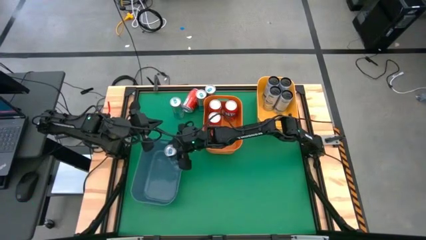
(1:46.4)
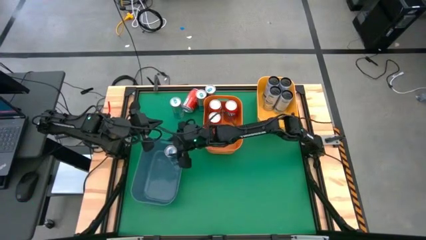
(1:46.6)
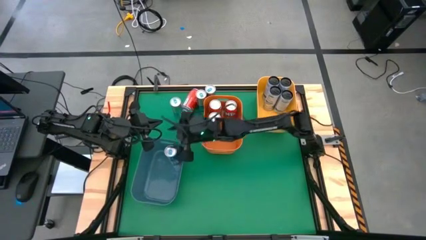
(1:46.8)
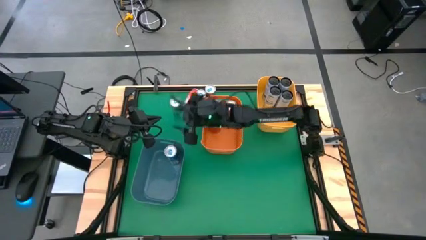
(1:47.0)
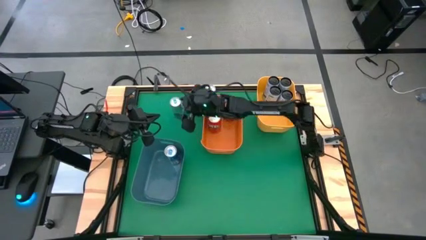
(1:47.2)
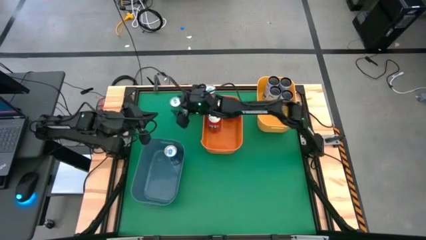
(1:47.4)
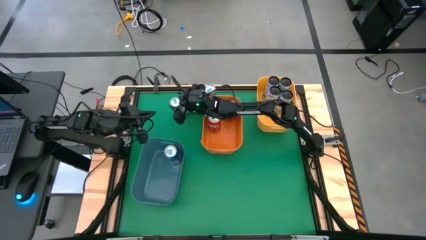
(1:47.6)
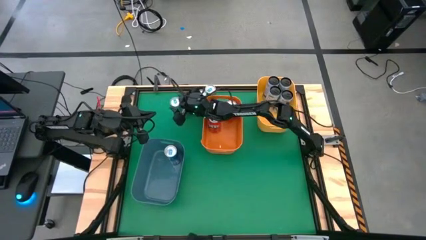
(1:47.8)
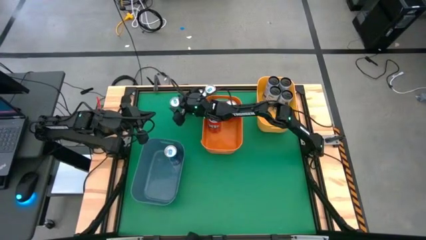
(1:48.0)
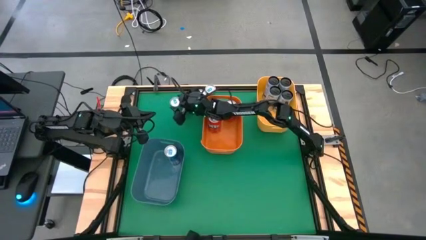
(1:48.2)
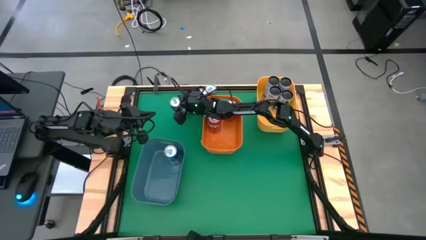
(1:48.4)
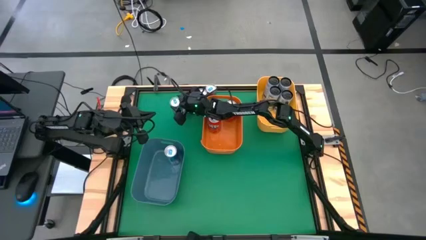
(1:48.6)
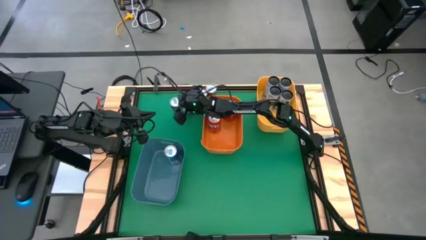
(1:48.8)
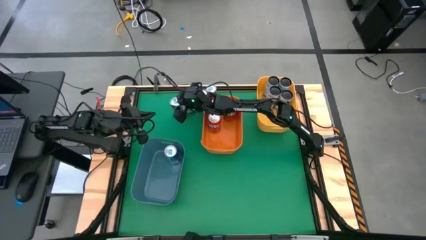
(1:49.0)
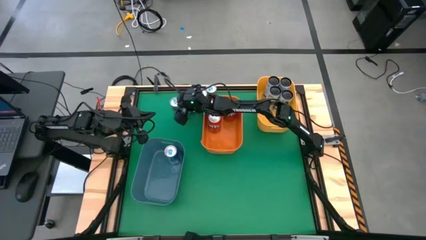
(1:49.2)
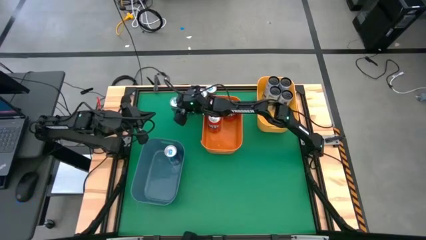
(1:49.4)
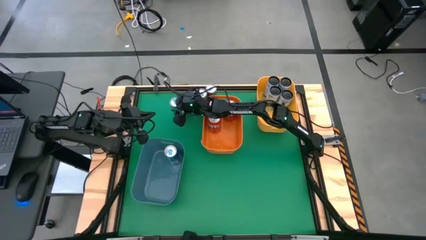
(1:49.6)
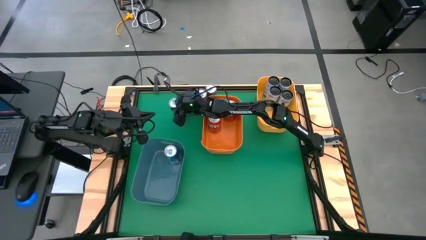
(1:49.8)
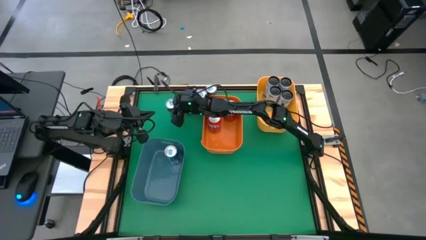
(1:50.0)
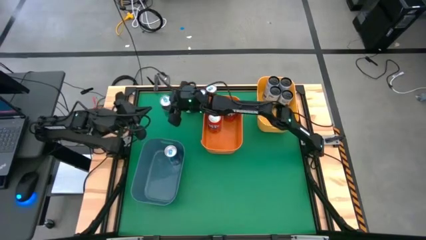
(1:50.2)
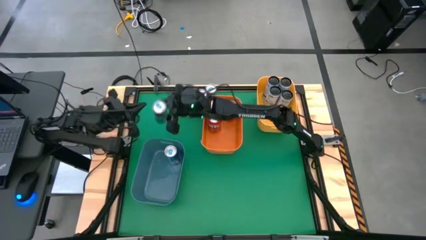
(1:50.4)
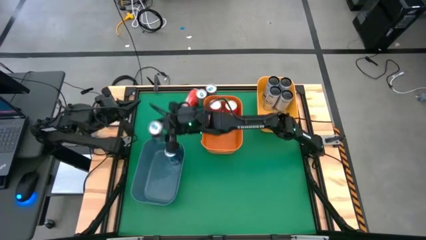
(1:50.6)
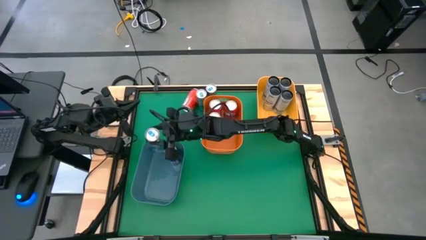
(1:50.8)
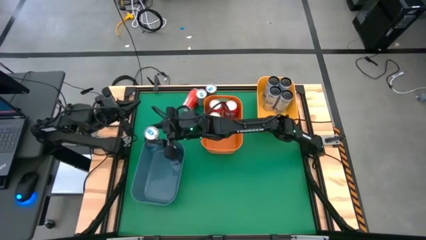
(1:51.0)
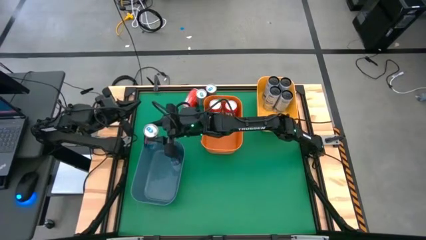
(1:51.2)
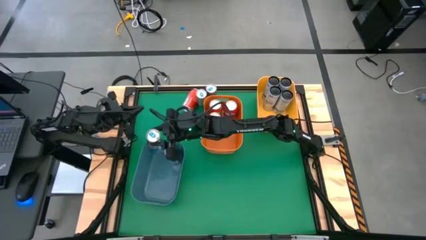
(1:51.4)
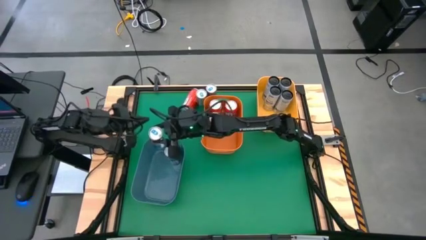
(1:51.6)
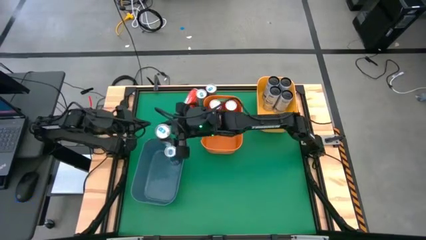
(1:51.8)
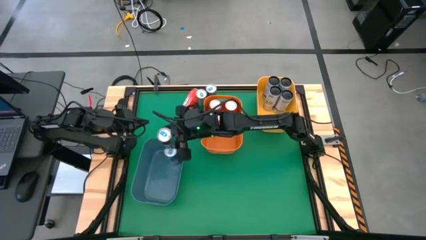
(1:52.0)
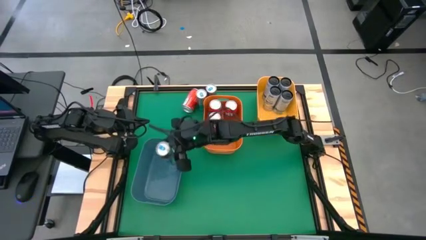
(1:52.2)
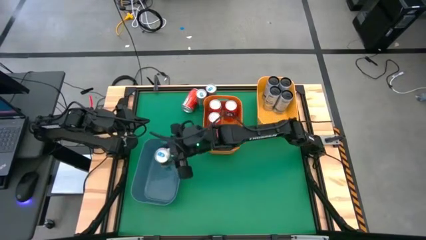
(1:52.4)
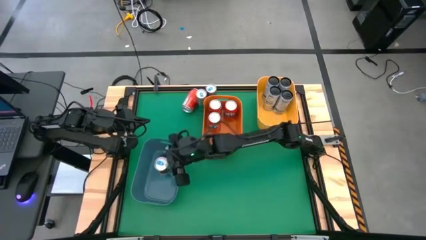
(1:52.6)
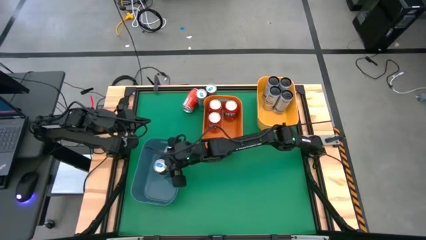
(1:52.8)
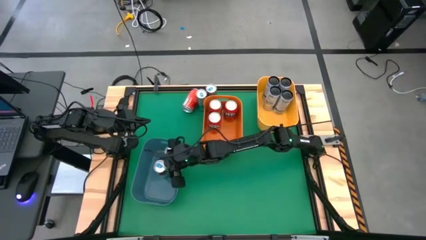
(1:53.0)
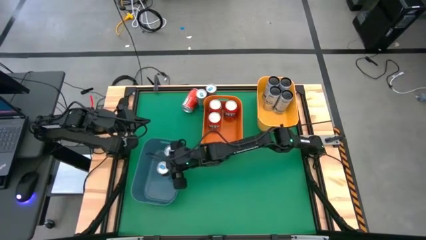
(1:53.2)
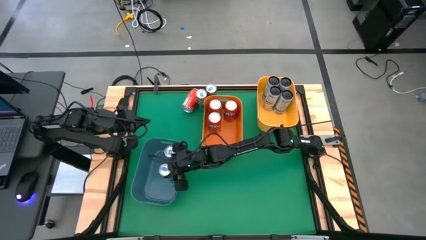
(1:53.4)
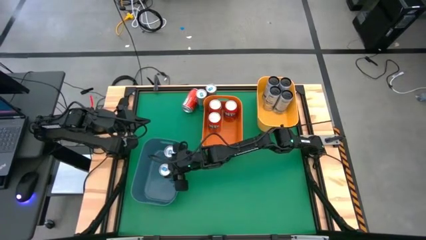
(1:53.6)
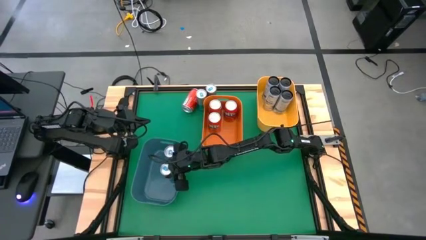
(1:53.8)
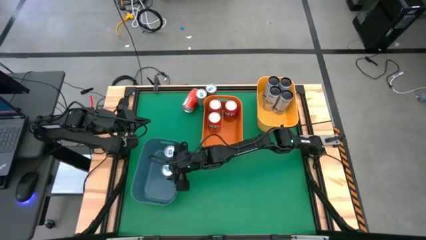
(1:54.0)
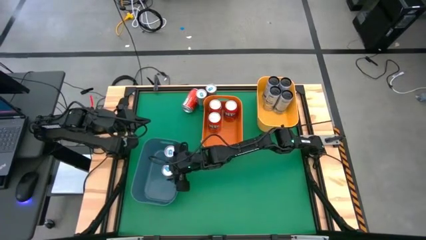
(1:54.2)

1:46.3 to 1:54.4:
Task: Sort soda cans
Put the blue soda can into the blue bin

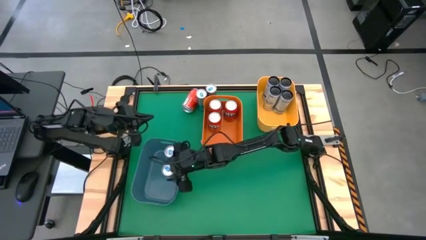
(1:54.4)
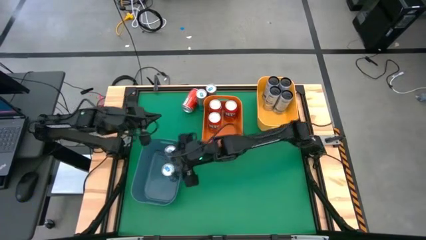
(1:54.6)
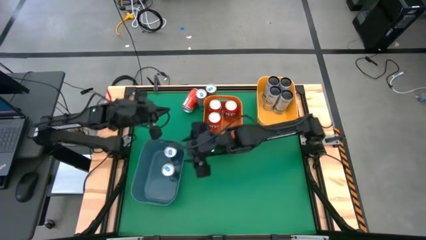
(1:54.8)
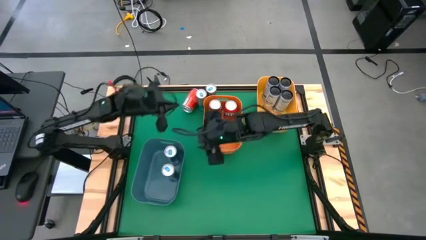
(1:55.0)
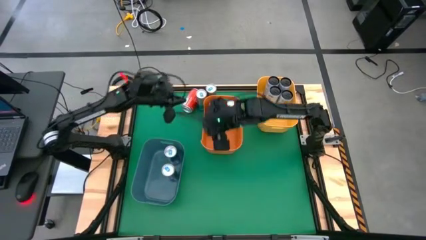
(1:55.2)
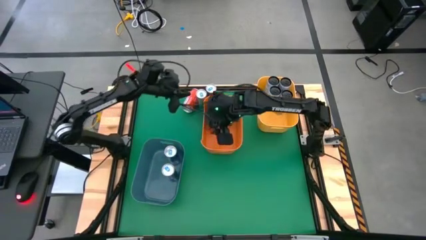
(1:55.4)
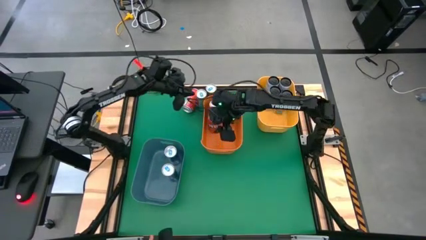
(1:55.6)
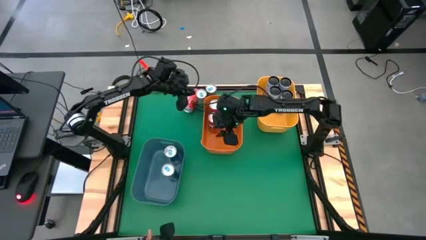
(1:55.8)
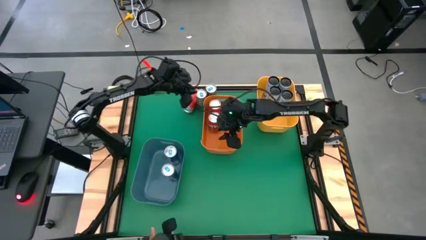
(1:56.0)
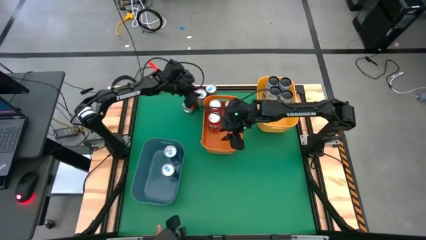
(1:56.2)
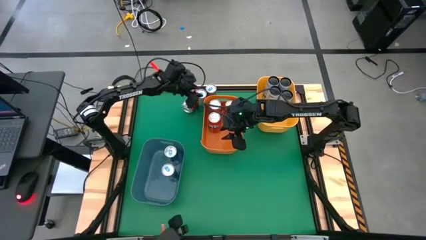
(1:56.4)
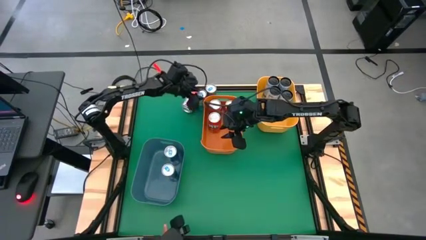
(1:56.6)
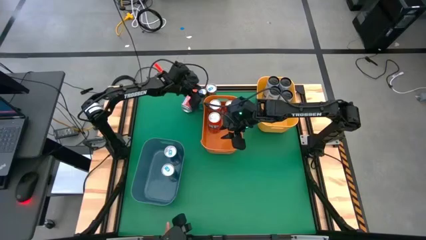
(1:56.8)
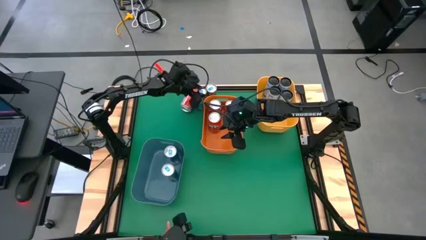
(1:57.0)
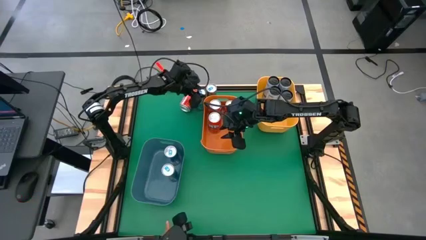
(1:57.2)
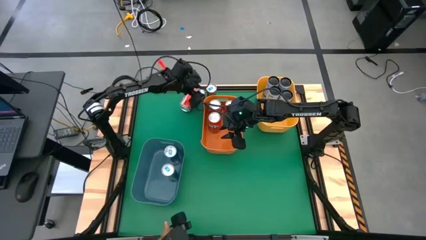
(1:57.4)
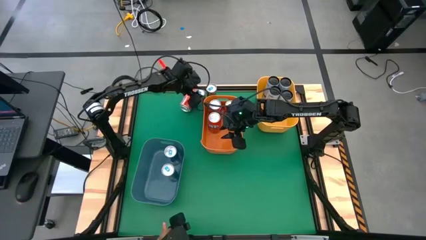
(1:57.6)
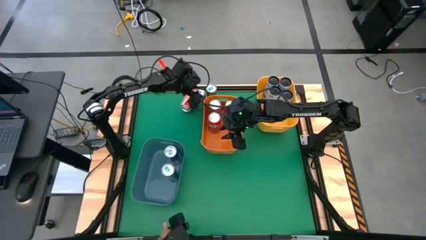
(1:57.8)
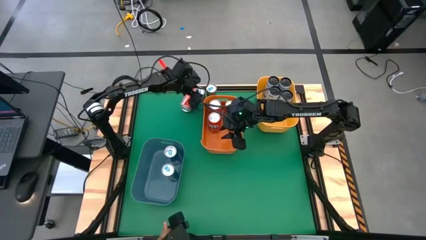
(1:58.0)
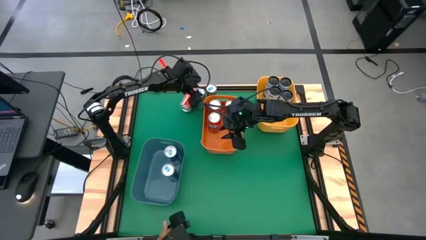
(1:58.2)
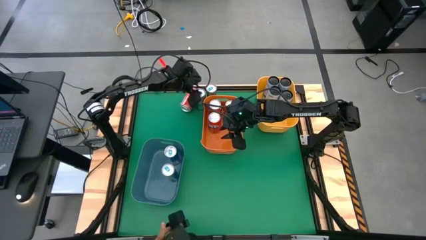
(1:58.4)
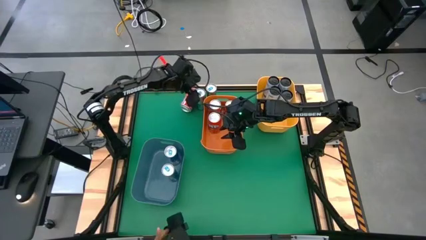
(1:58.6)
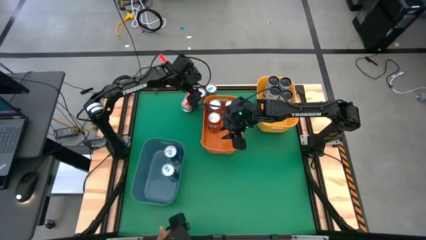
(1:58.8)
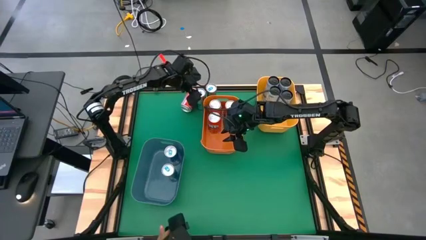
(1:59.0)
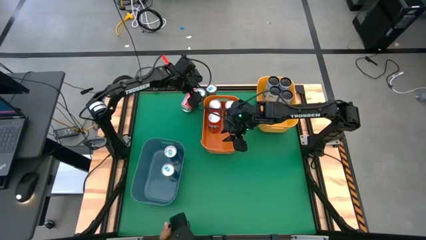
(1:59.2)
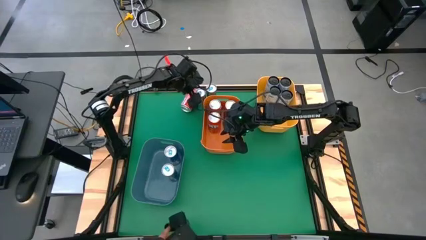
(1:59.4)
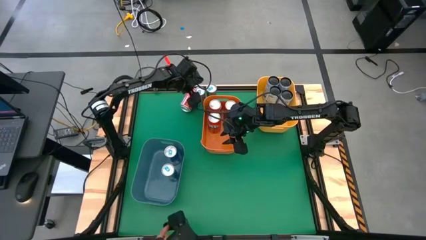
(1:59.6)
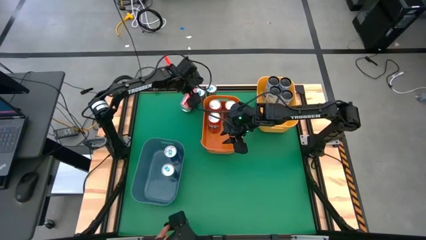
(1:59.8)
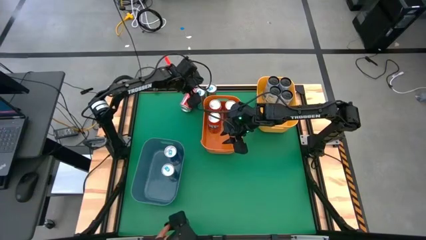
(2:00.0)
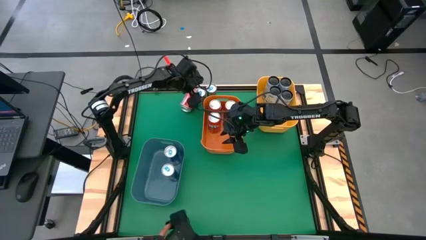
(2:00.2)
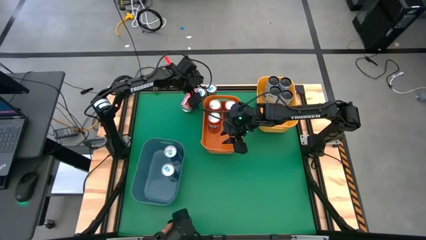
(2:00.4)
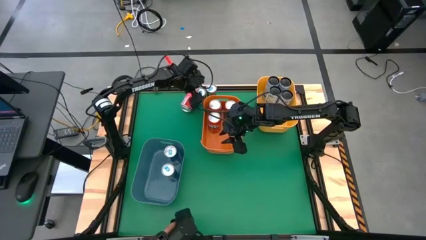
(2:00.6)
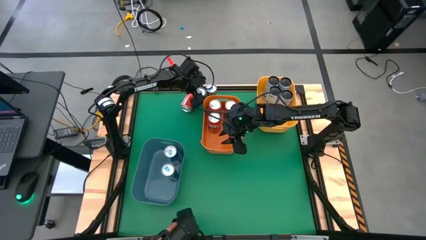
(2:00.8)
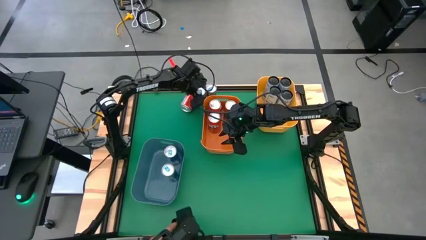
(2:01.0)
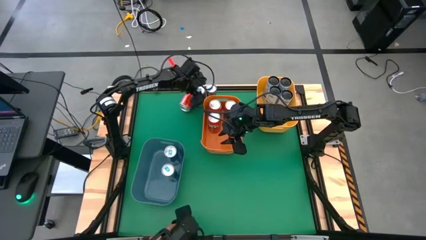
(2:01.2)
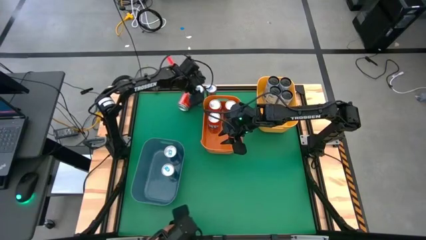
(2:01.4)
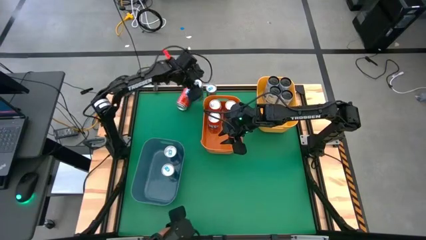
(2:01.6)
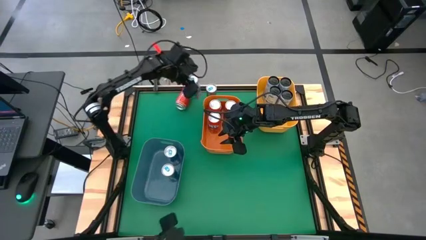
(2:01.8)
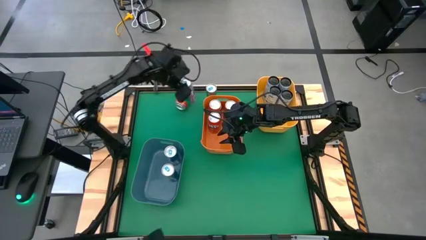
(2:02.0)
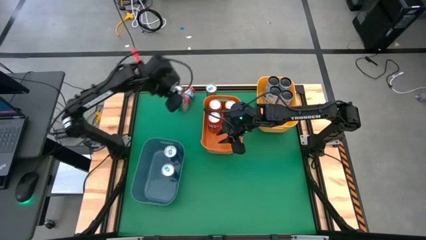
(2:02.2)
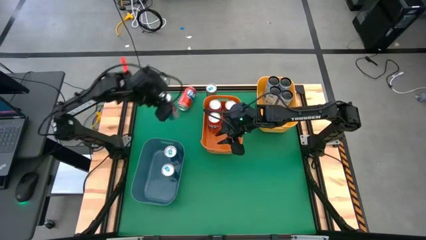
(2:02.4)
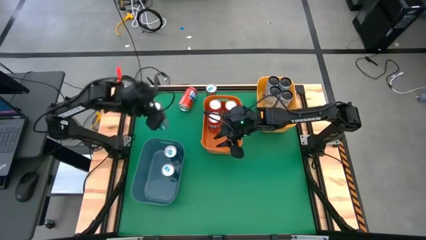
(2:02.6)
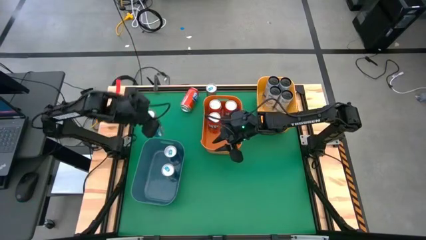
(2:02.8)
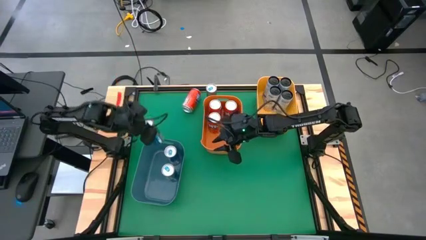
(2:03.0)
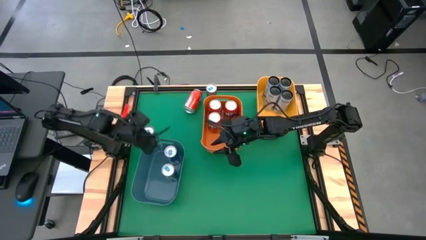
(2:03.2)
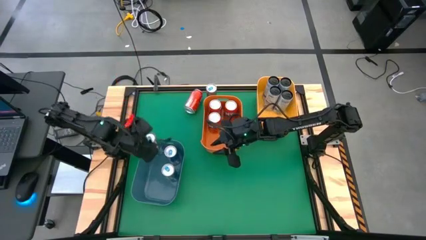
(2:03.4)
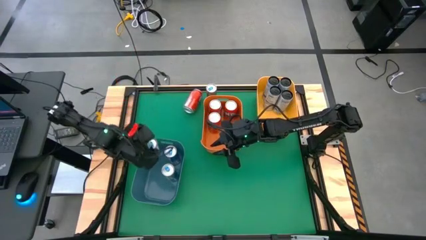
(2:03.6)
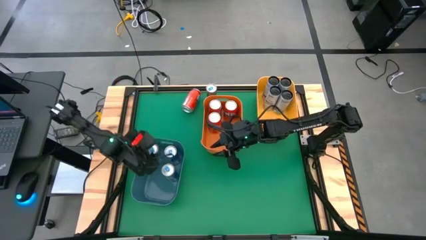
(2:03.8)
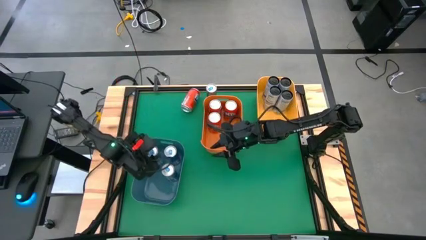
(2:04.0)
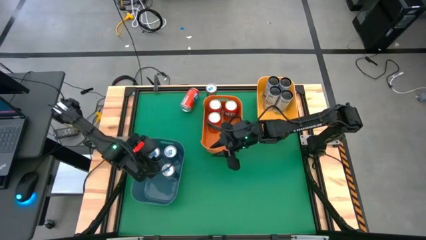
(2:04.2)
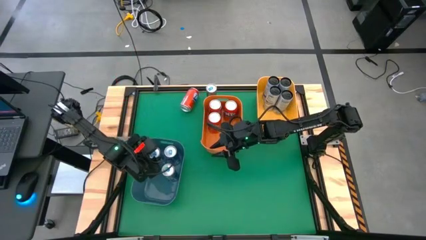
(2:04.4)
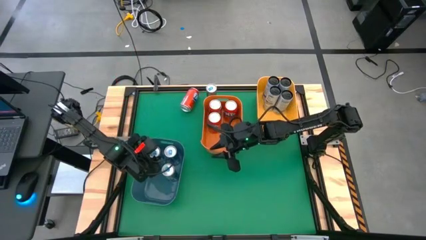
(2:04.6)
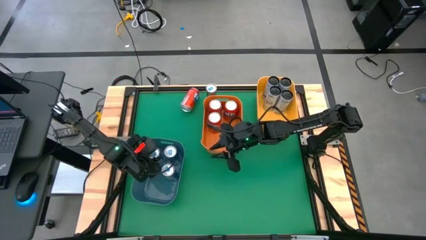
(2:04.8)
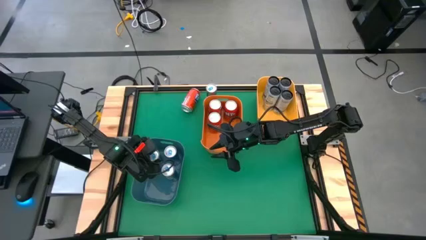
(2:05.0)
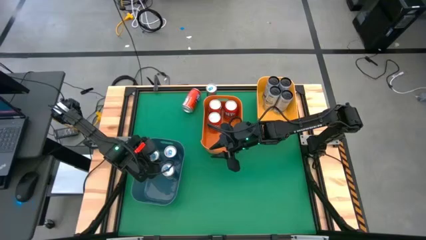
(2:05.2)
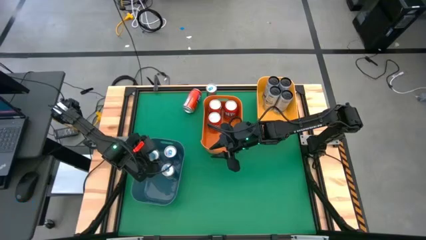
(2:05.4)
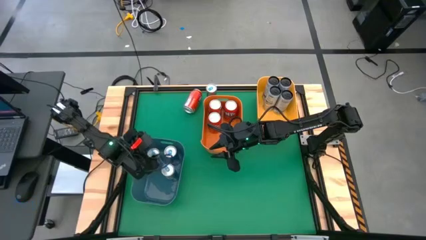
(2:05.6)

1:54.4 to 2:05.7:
Put the blue soda can into the blue bin
